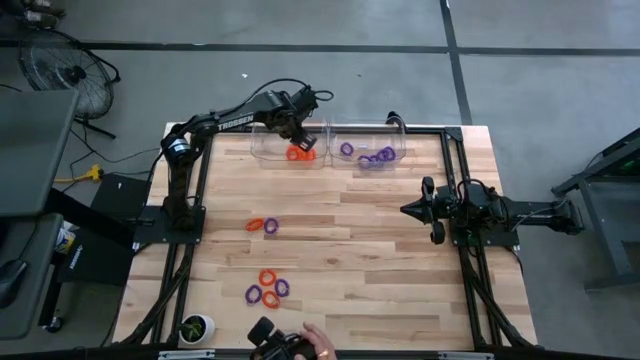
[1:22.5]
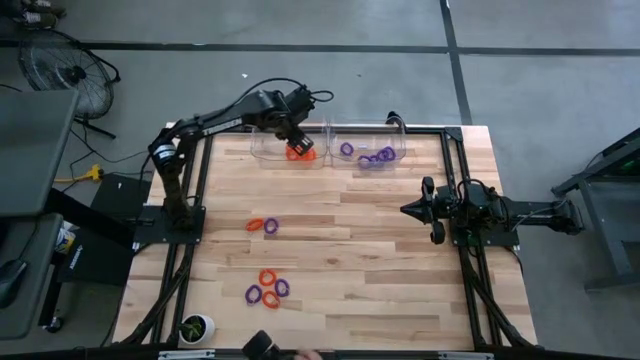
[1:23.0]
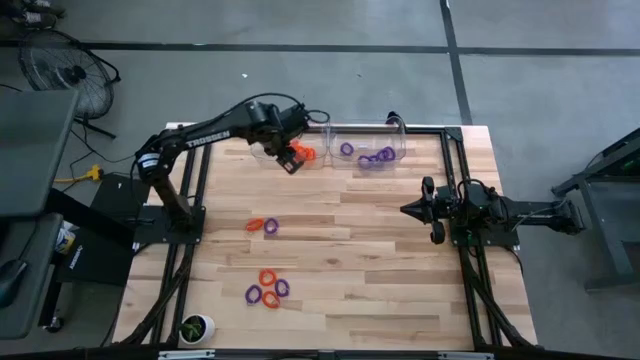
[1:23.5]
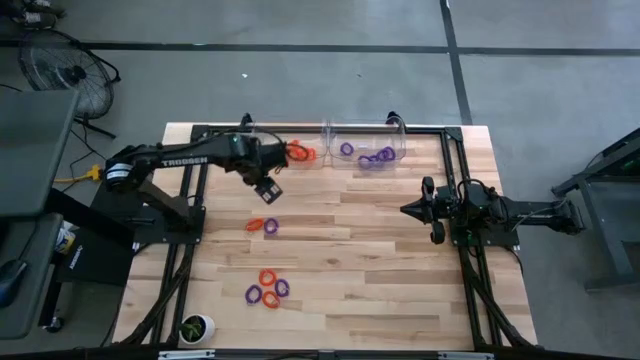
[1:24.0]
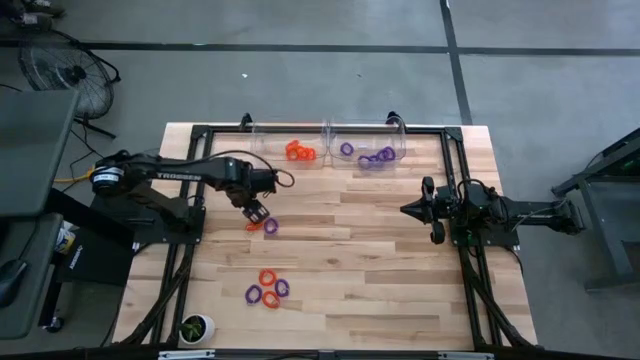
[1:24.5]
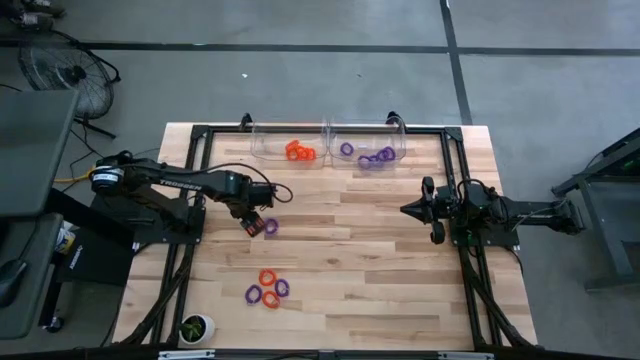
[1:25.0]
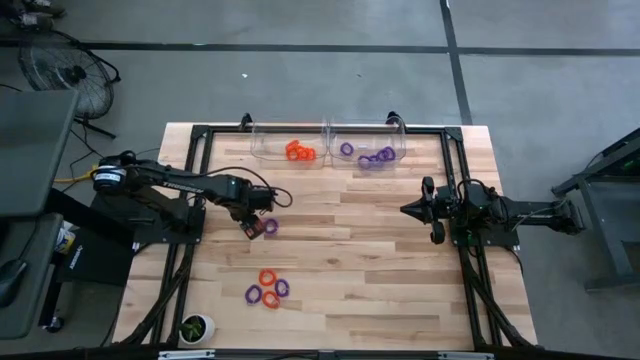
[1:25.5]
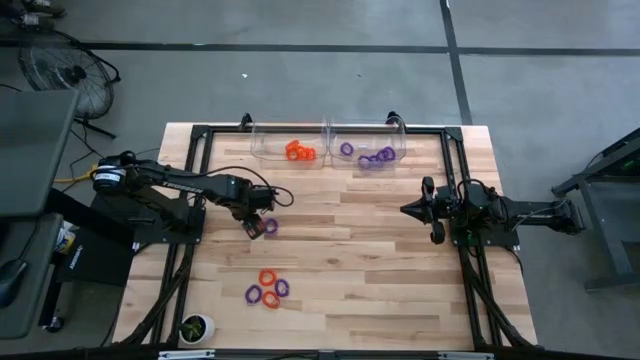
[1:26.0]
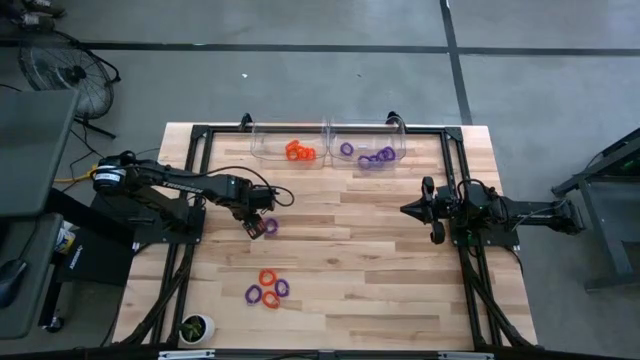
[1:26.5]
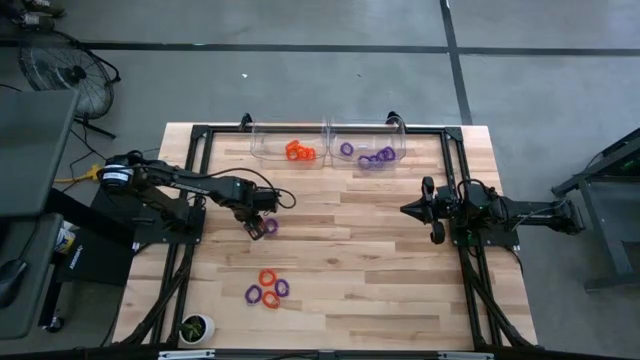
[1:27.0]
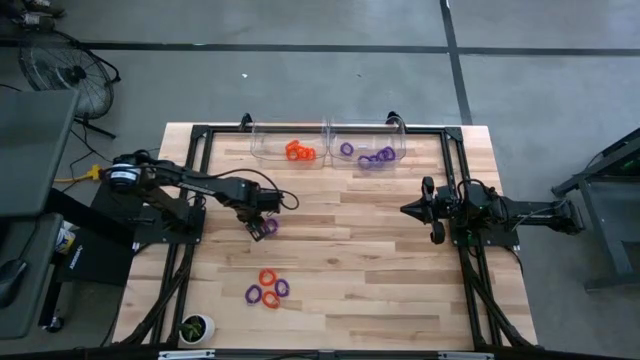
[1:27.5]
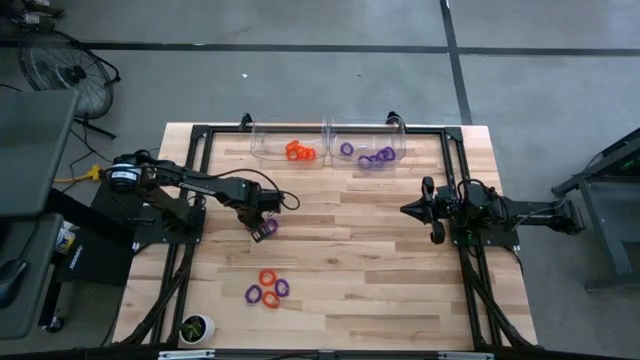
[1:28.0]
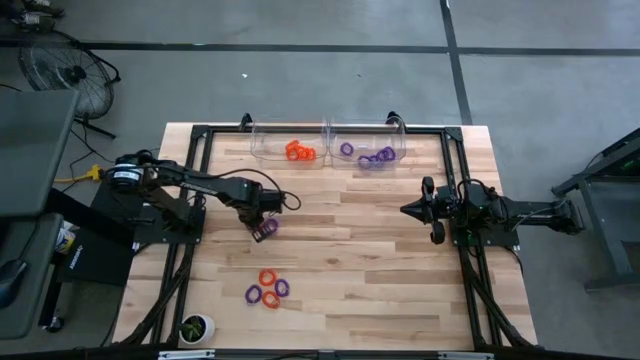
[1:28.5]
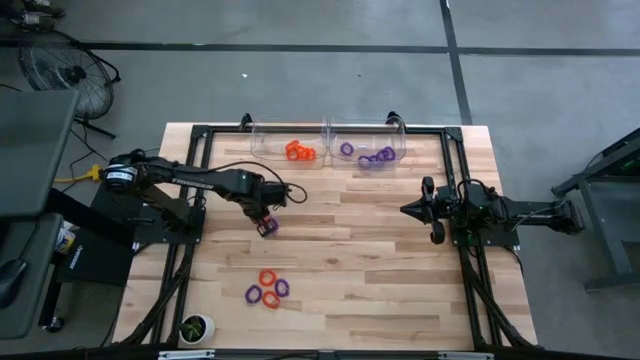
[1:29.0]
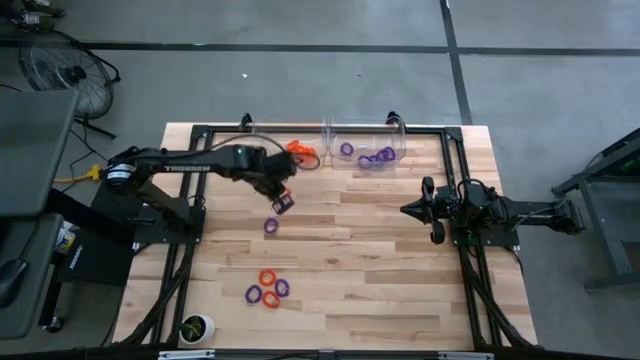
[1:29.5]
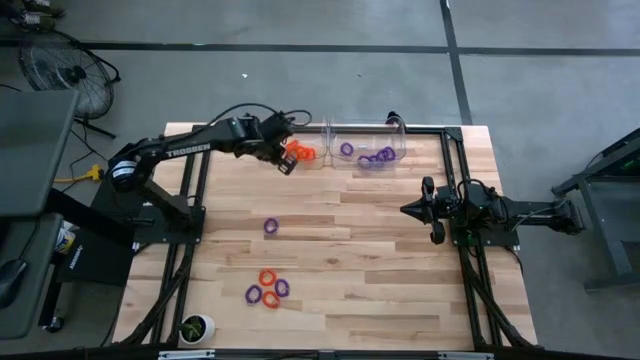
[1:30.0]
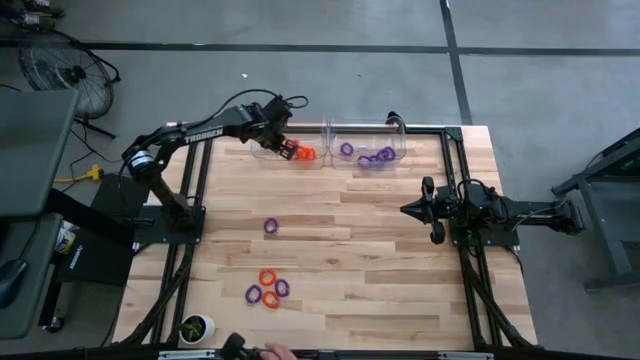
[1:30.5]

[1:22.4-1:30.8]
Task: Sort spring keychains
Put the orange spring keychain into the left transparent bin

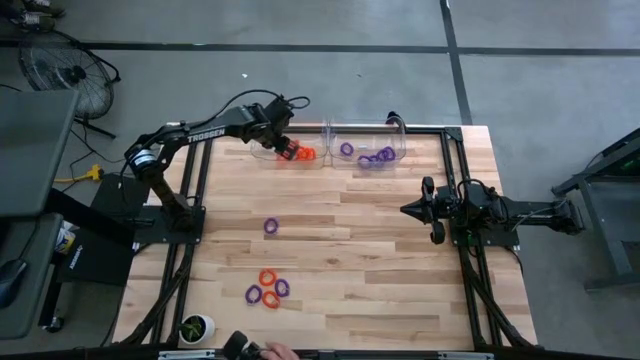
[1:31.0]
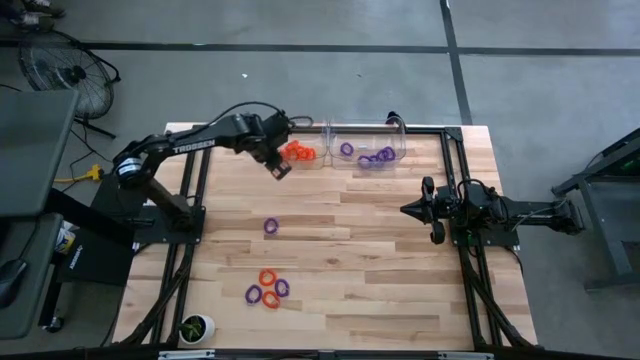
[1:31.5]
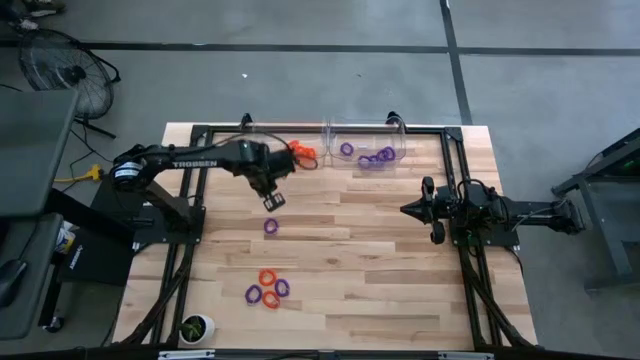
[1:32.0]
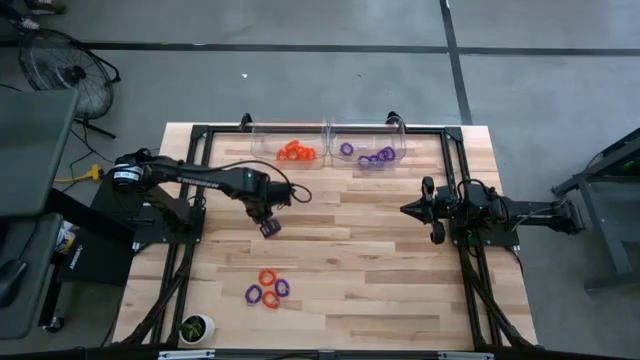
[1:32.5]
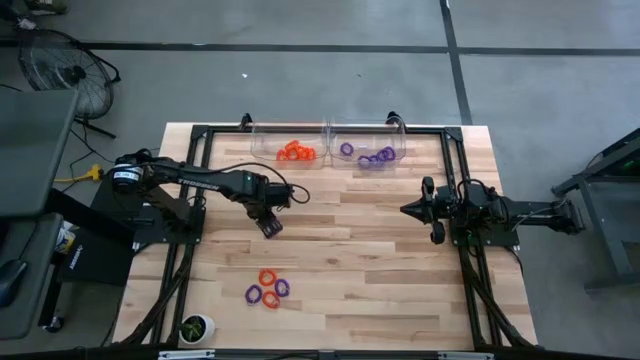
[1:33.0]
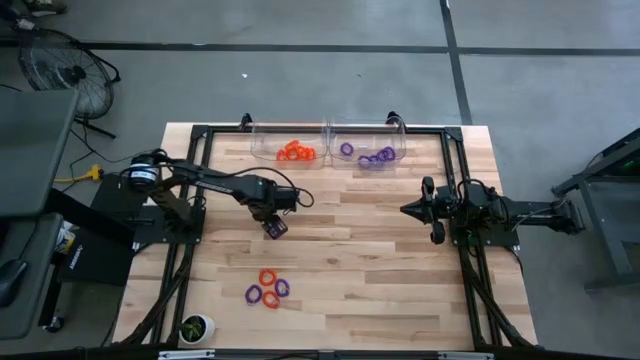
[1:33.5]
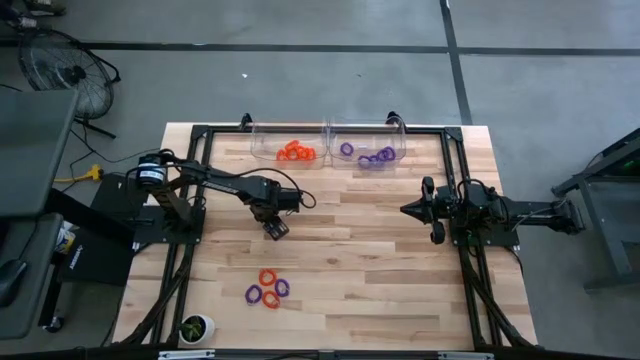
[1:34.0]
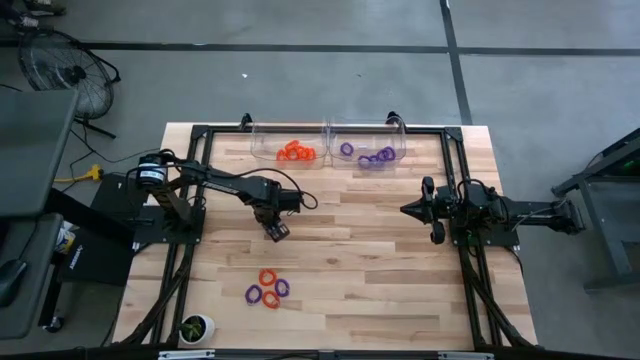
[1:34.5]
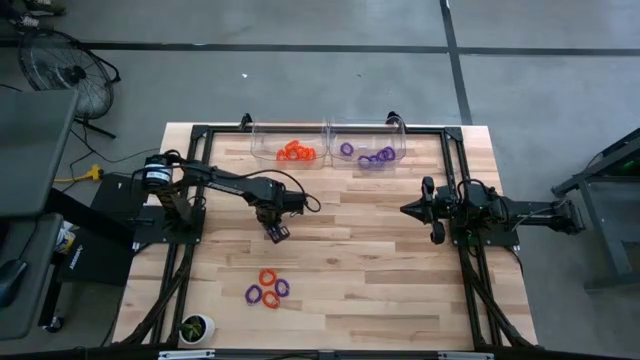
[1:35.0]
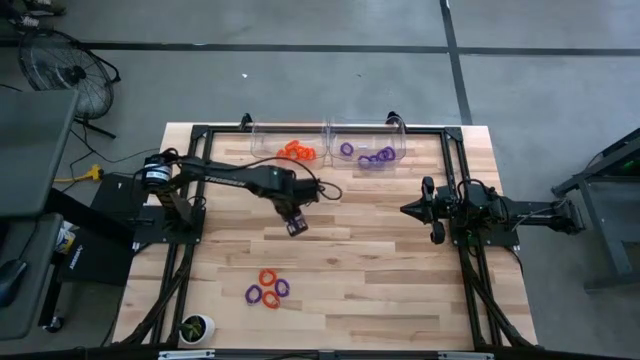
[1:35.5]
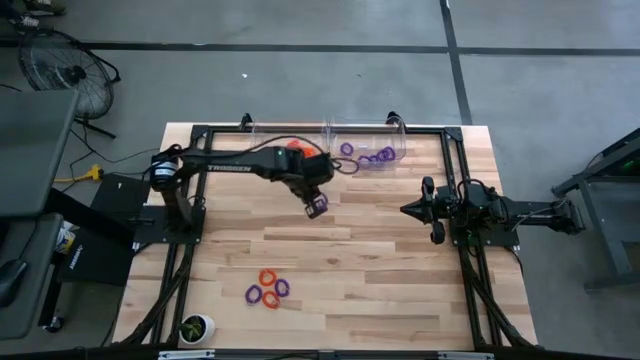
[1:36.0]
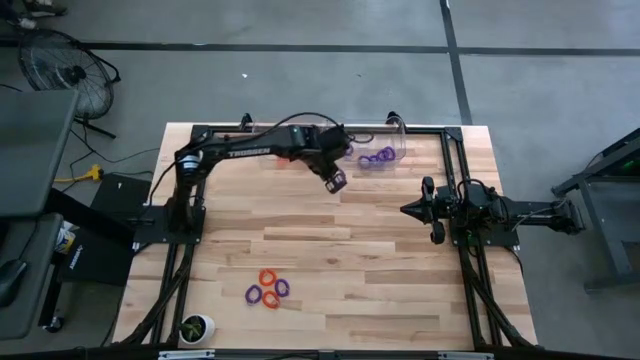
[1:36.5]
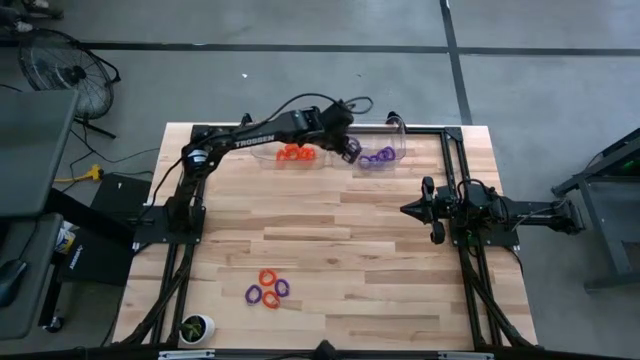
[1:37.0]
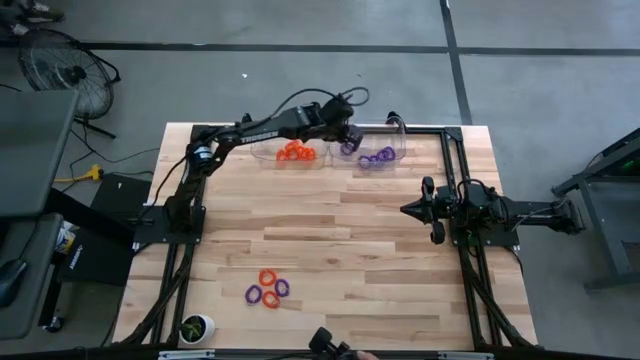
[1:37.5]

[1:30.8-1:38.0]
Put the violet spring keychain into the right transparent bin

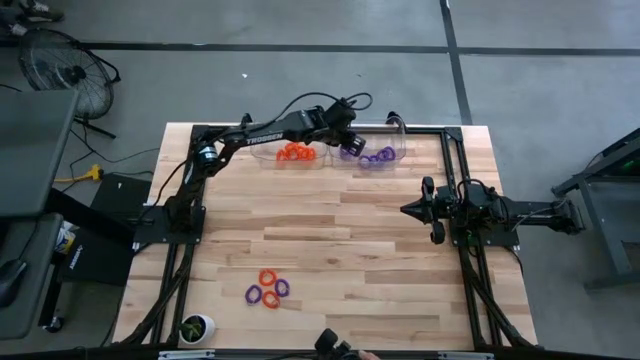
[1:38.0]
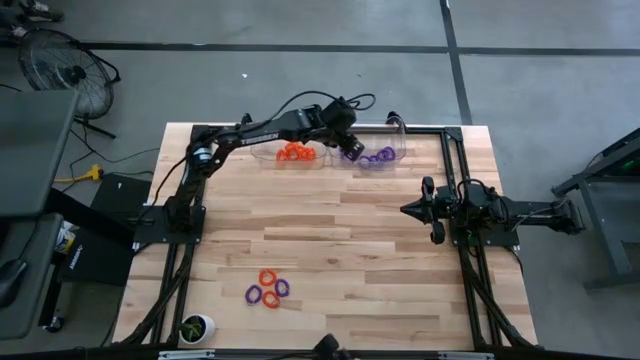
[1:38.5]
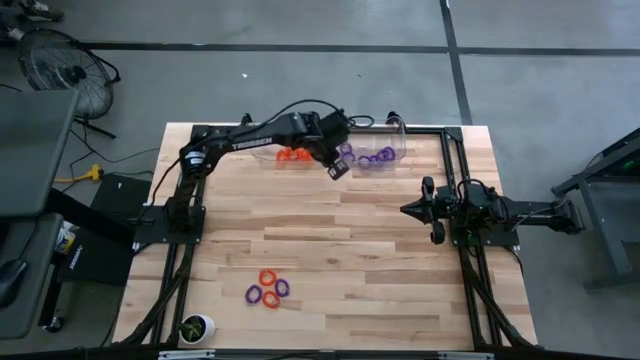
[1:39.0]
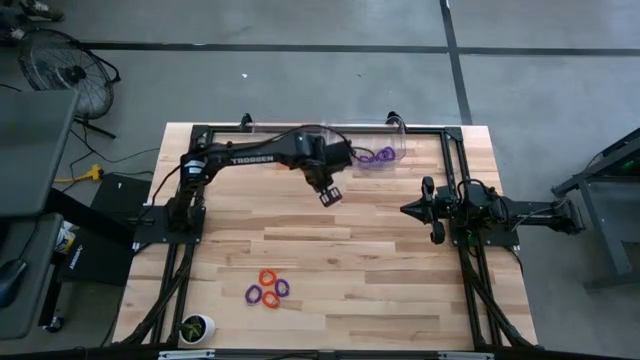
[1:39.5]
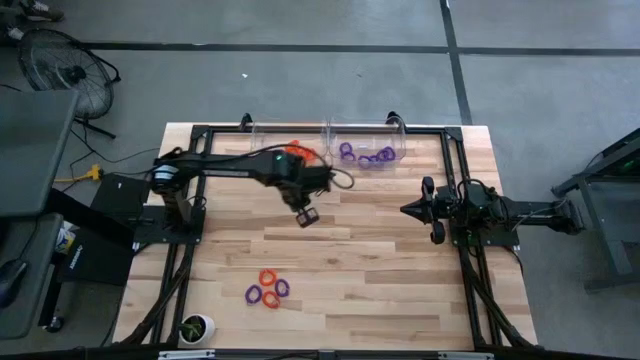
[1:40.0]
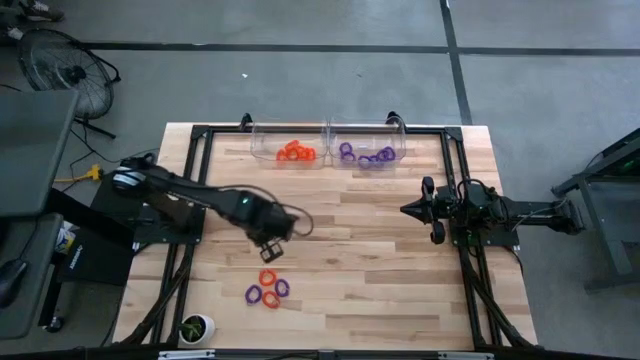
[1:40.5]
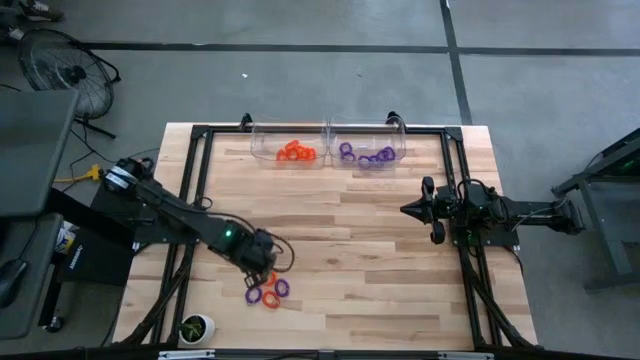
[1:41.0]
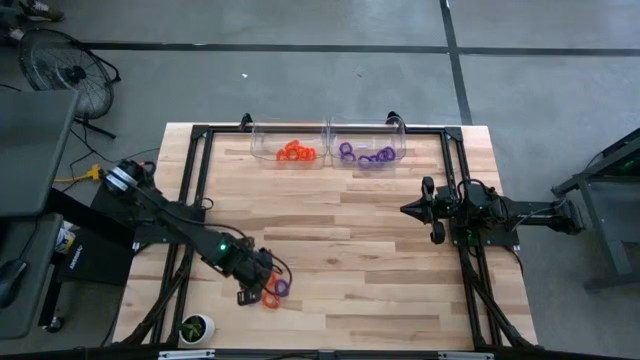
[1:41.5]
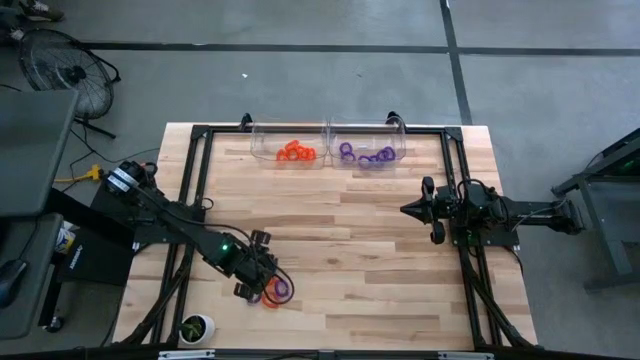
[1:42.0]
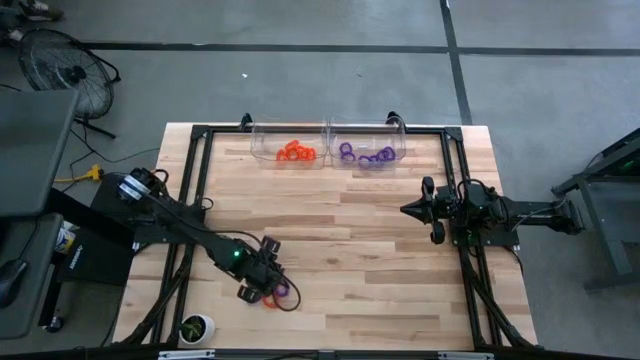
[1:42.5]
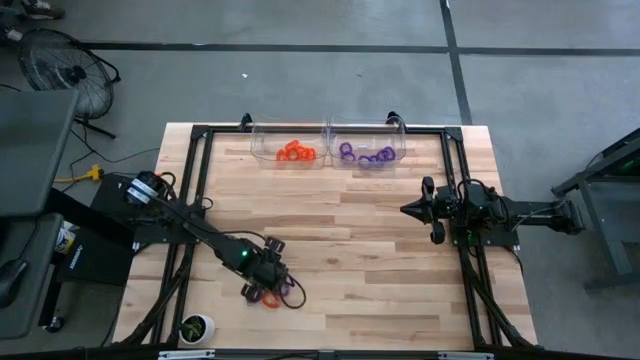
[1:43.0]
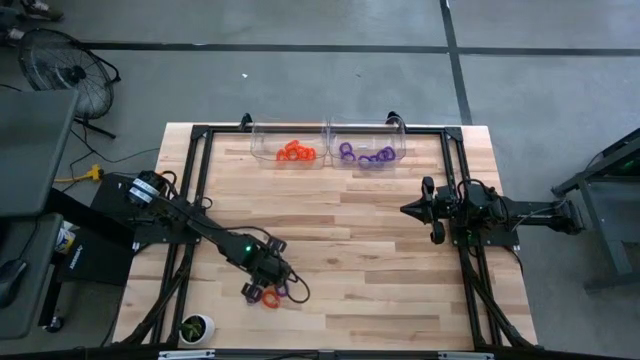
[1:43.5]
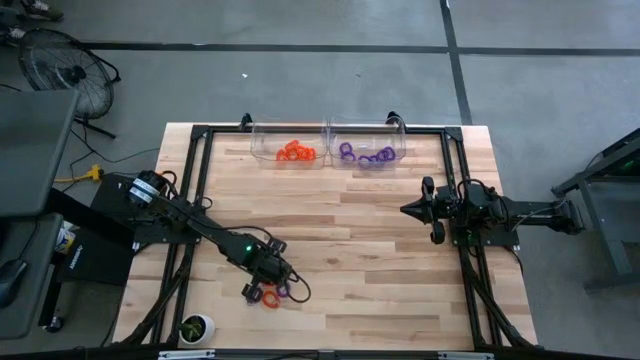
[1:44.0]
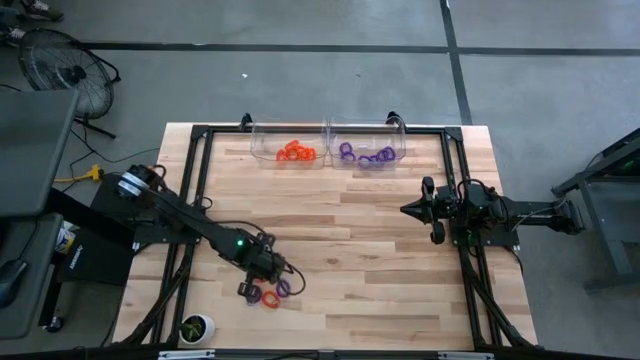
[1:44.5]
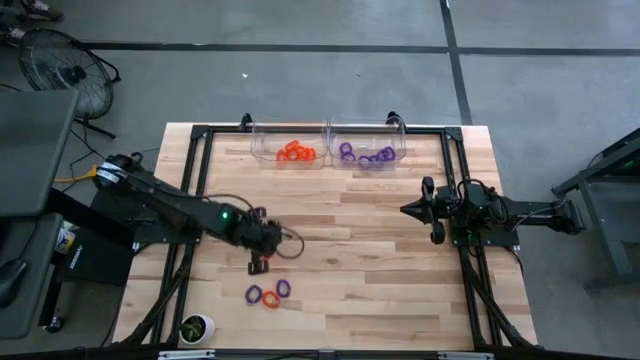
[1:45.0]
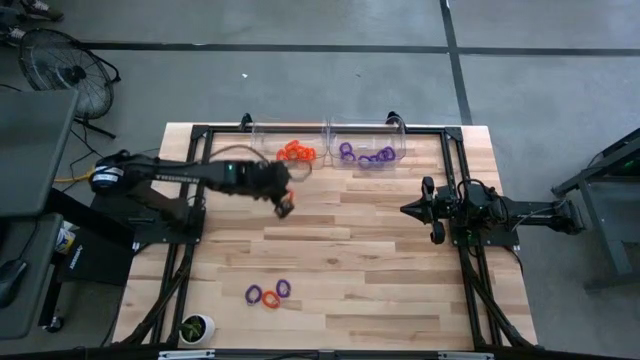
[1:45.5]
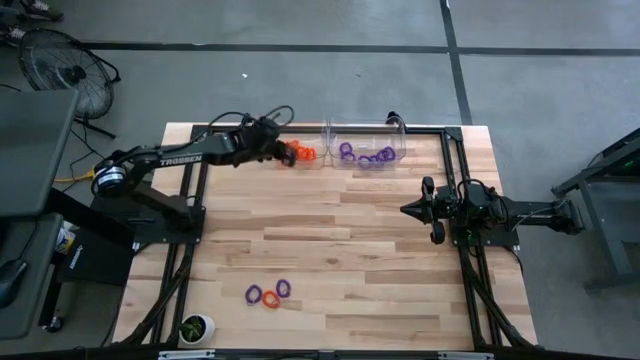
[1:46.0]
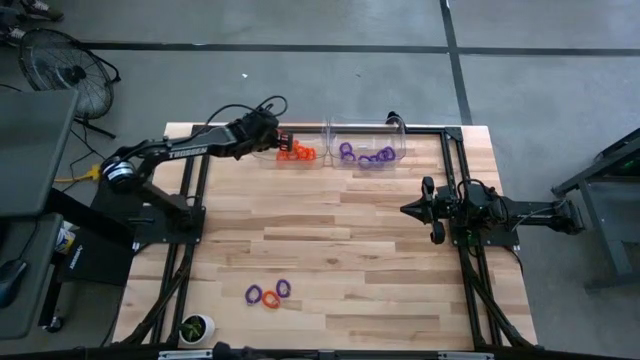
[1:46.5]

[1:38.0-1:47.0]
Put the orange spring keychain into the left transparent bin
